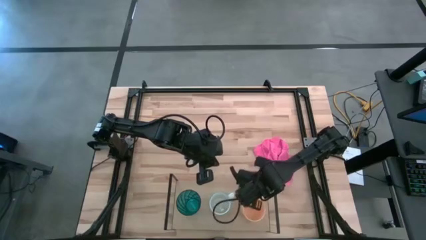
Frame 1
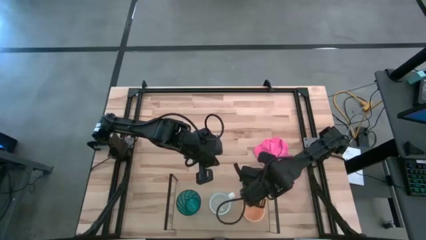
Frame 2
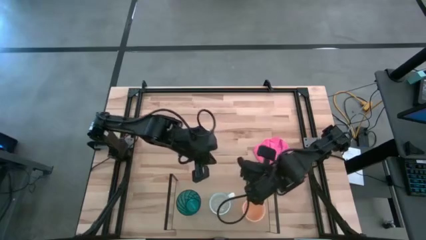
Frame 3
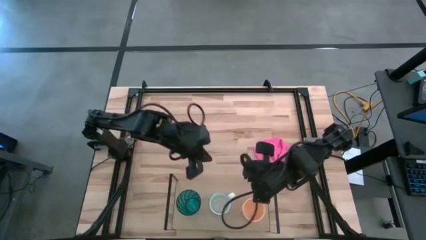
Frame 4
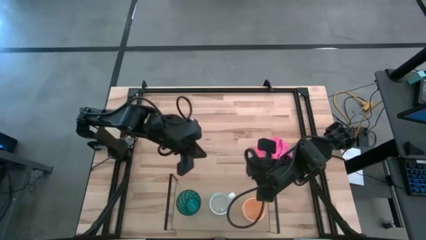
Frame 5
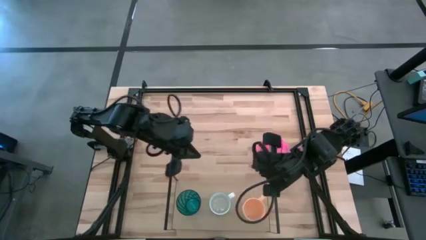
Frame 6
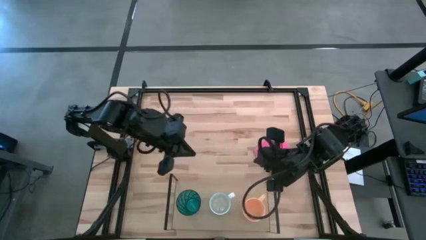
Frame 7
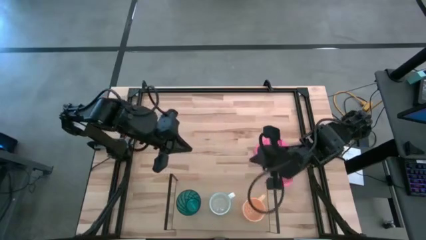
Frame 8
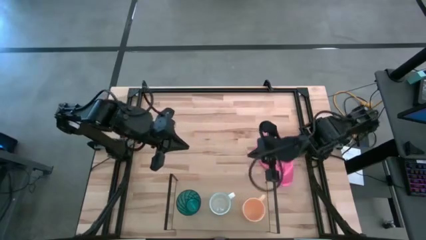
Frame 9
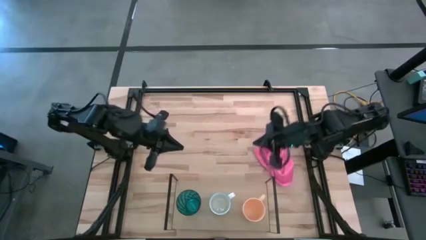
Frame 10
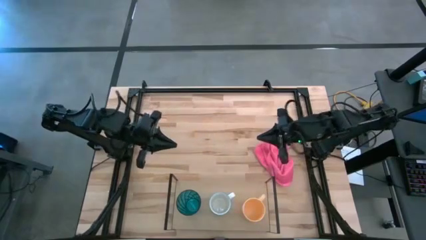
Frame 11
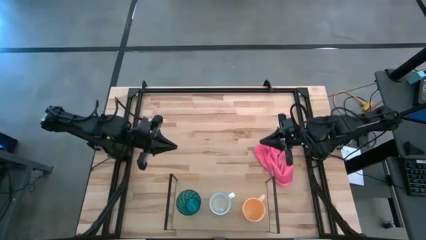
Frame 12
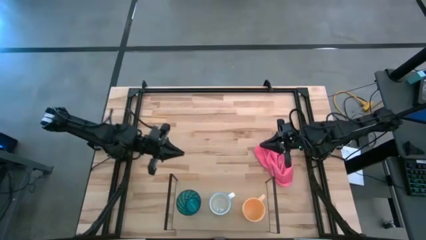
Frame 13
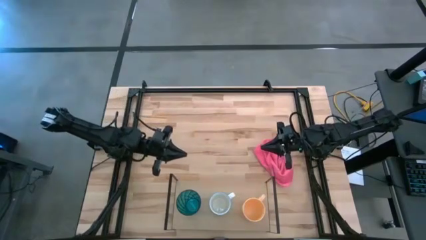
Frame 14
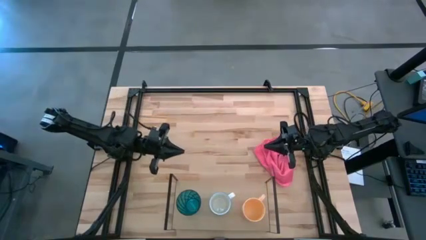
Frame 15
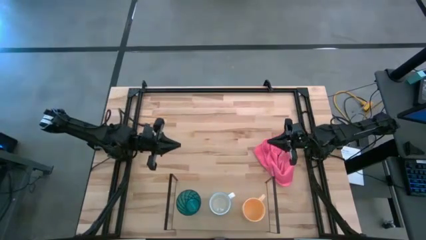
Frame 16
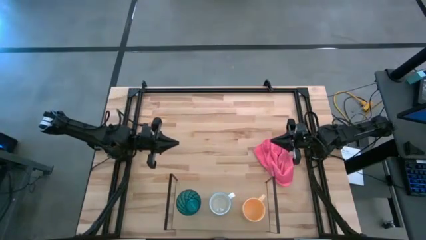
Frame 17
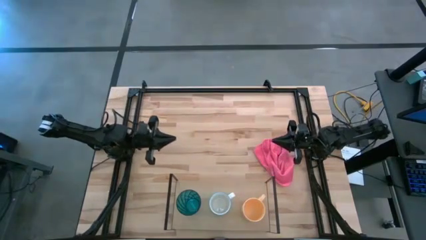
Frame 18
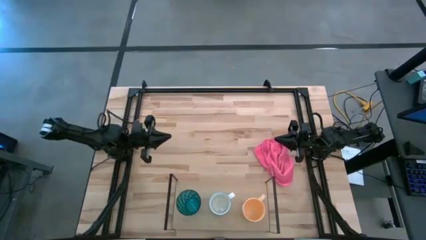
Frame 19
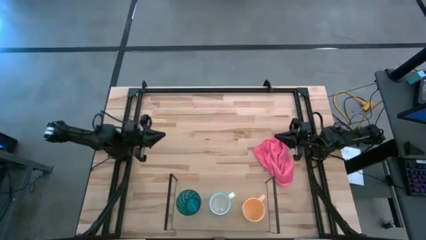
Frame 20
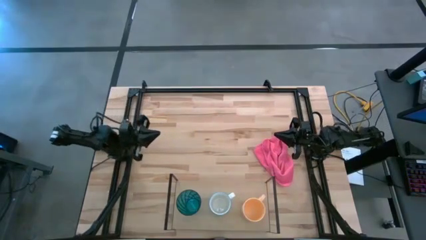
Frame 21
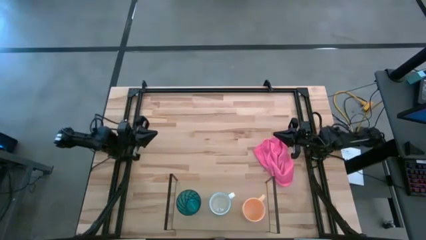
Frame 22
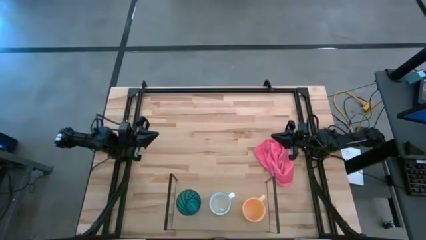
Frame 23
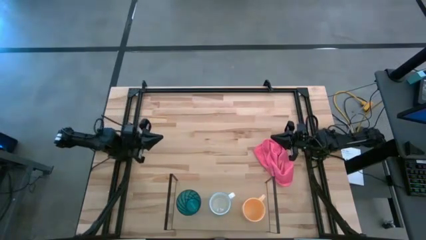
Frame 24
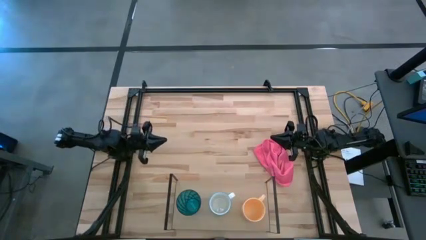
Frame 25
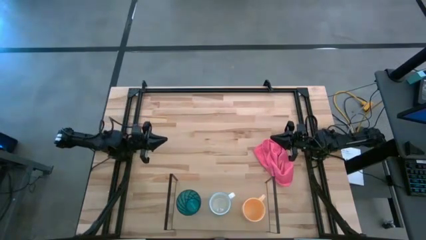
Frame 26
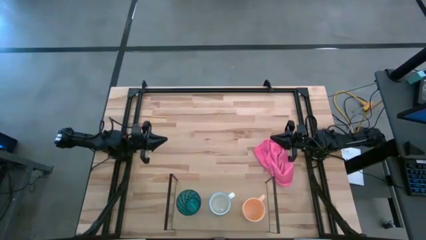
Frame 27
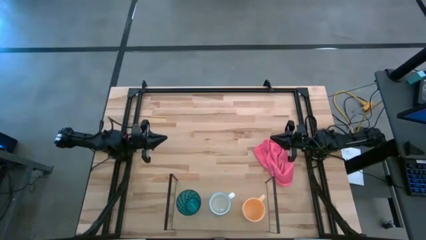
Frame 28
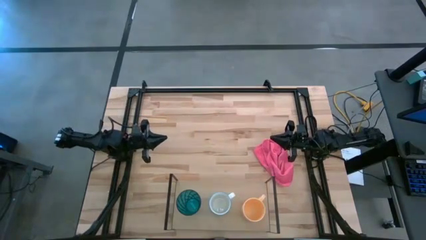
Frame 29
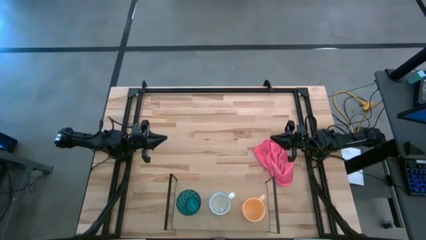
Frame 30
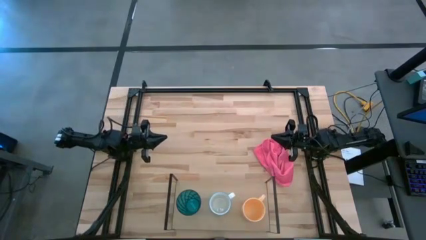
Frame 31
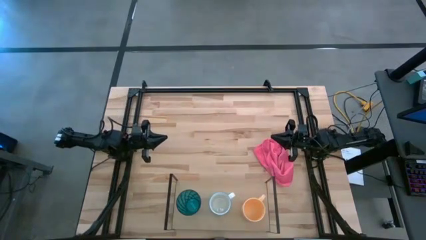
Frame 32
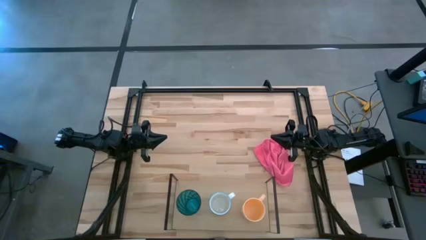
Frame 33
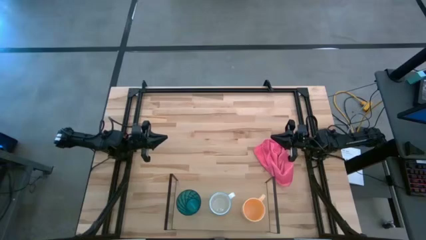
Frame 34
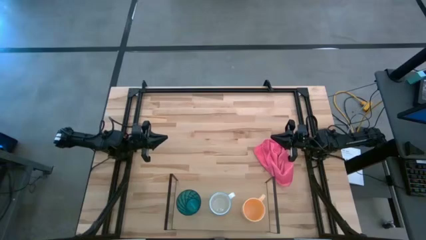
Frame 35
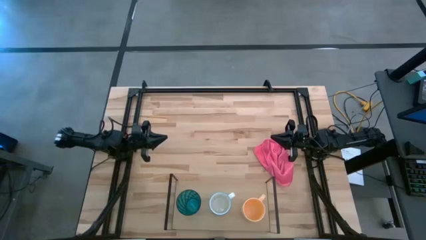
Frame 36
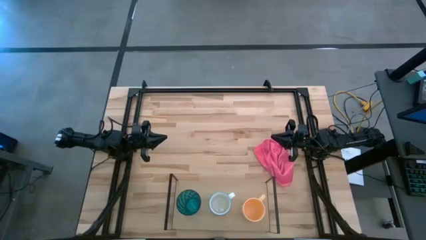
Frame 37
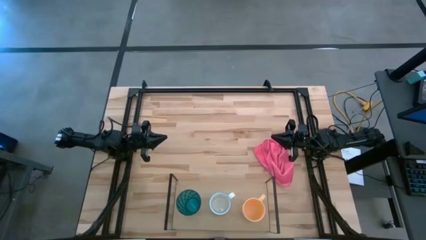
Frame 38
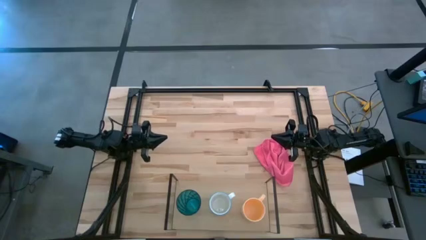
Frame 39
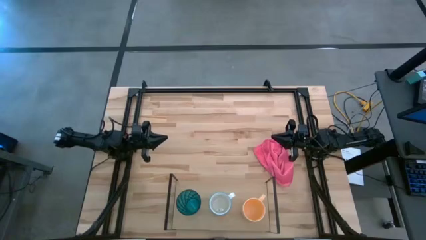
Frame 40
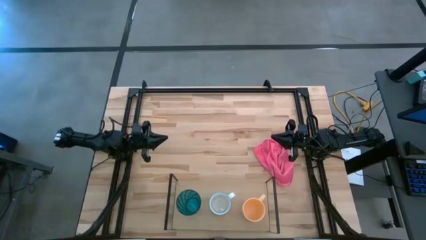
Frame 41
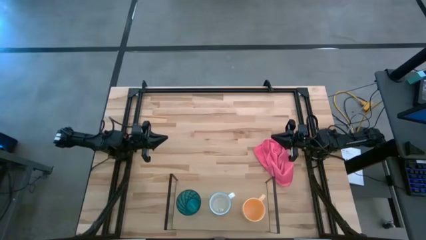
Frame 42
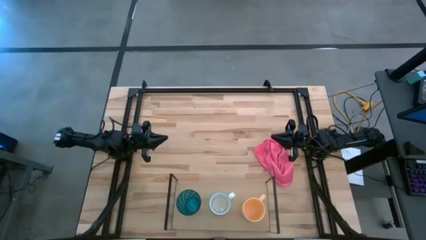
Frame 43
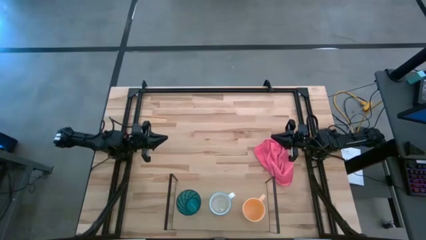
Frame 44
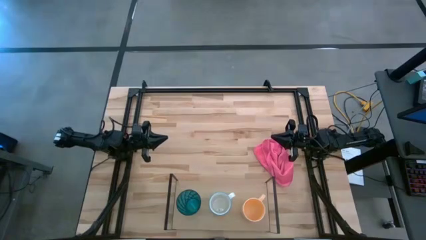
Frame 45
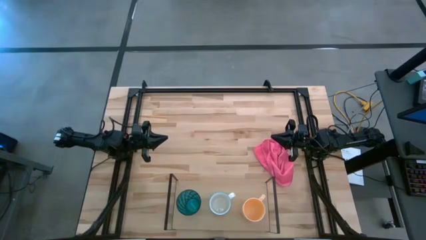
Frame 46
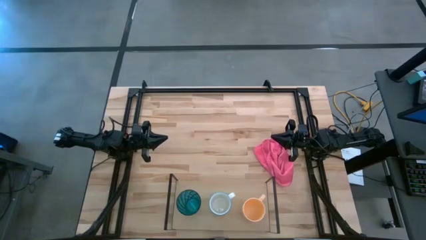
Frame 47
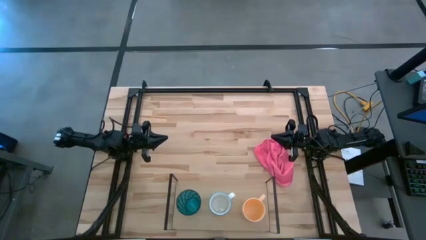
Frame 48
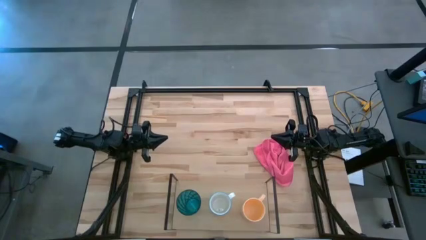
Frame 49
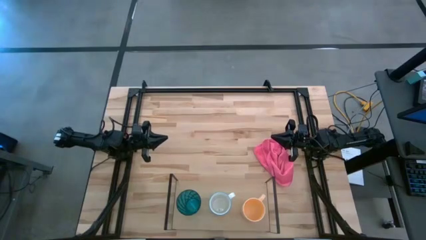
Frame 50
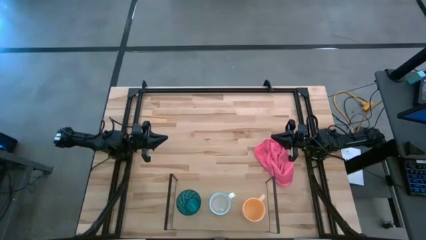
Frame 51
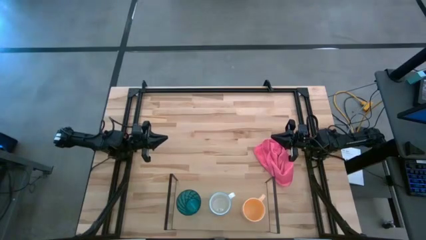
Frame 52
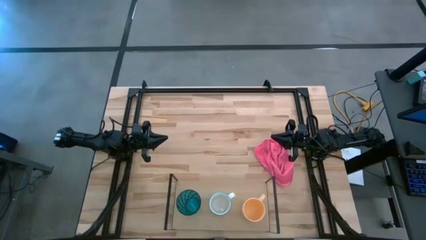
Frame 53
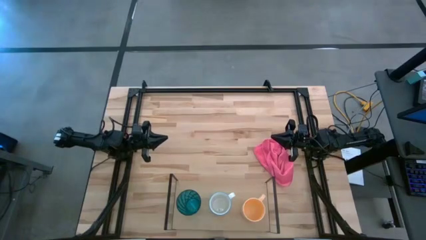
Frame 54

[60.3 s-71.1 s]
Task: Stack small to large cups/mugs on shelf
Return to Home Position
